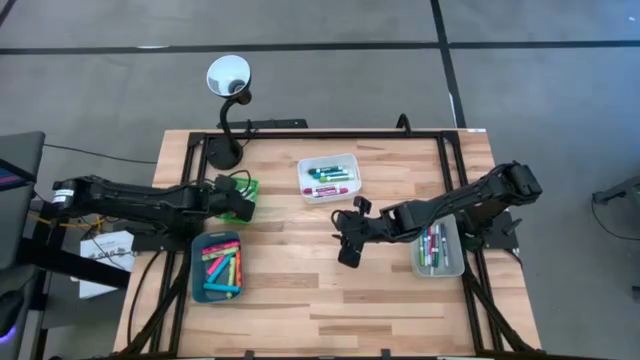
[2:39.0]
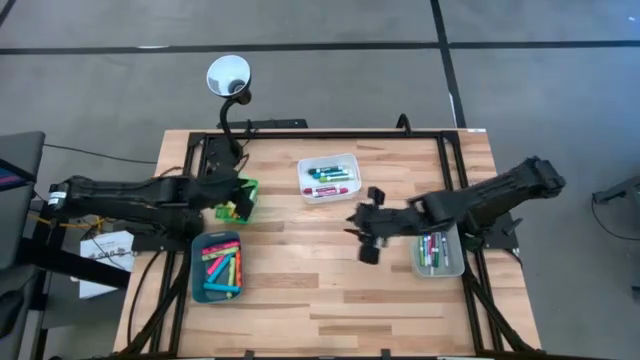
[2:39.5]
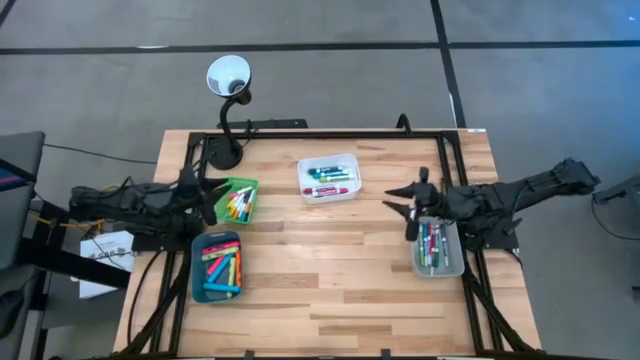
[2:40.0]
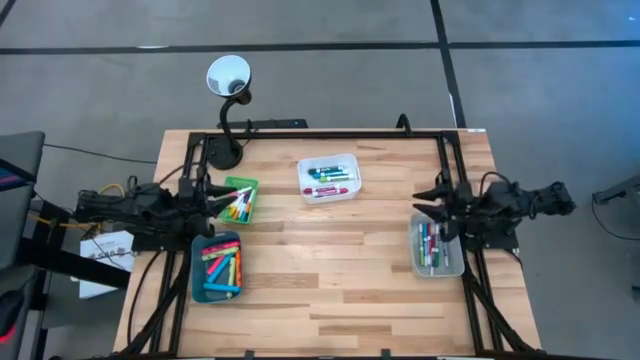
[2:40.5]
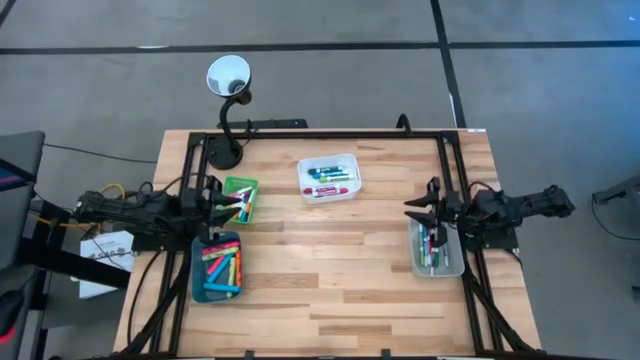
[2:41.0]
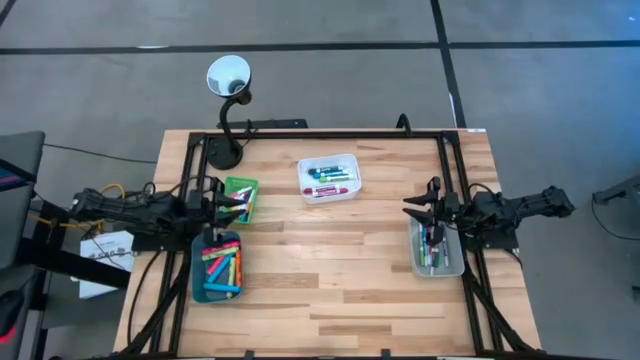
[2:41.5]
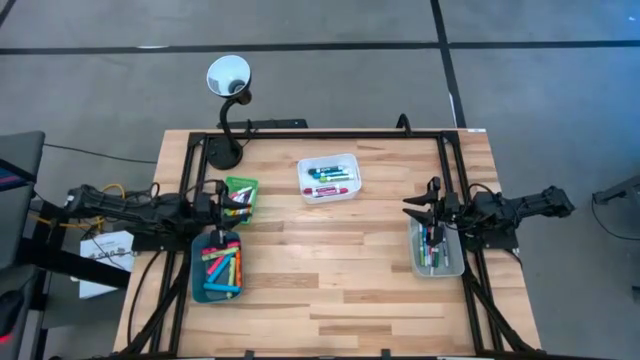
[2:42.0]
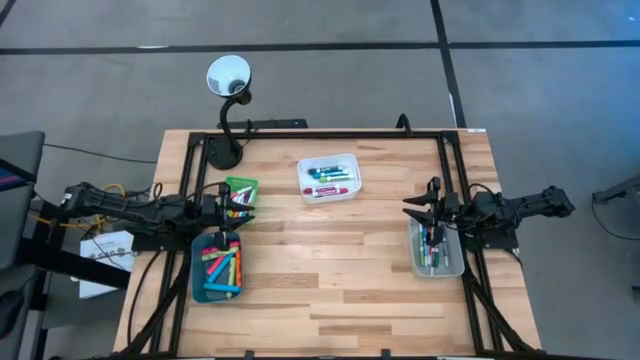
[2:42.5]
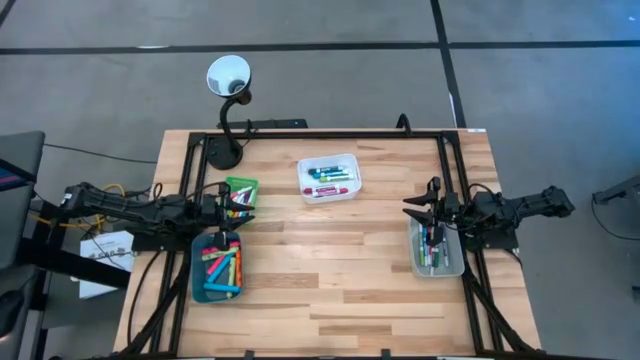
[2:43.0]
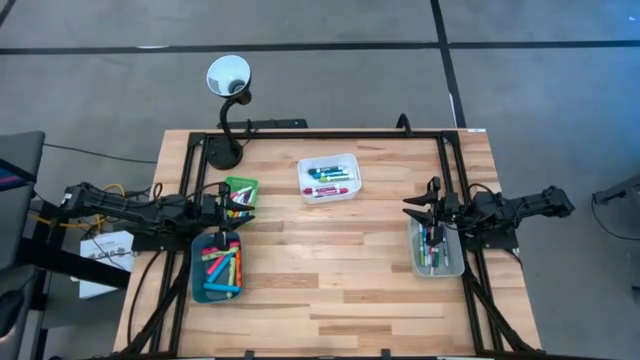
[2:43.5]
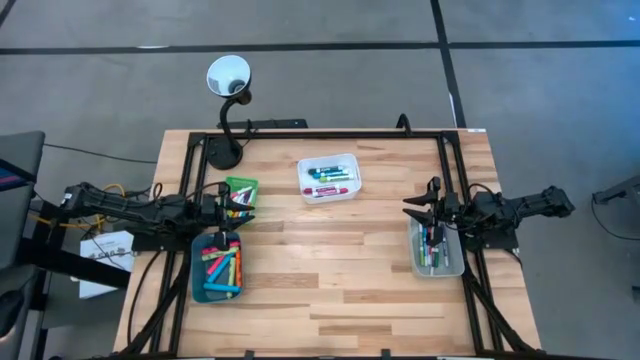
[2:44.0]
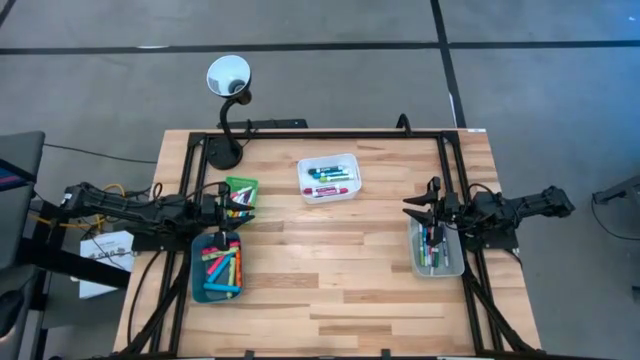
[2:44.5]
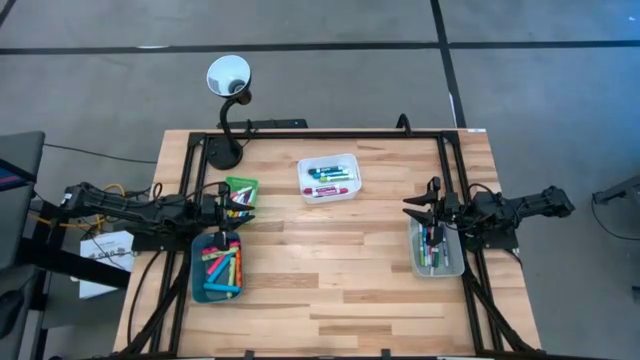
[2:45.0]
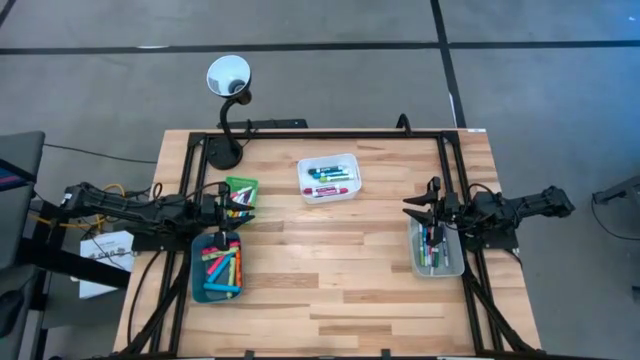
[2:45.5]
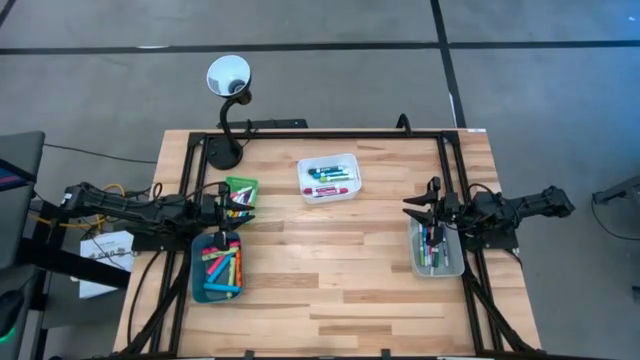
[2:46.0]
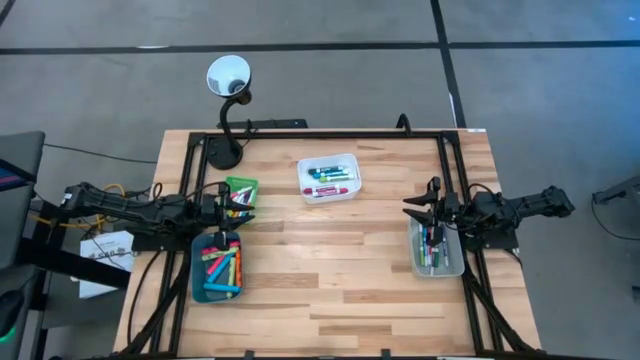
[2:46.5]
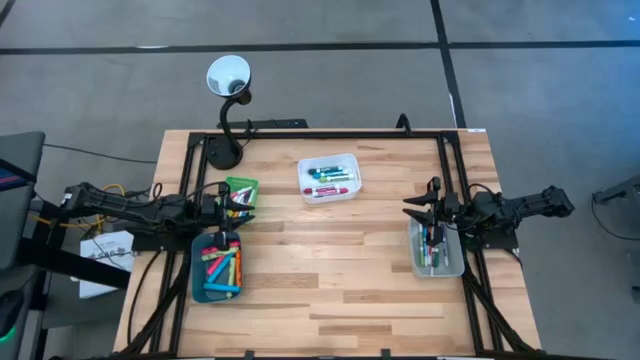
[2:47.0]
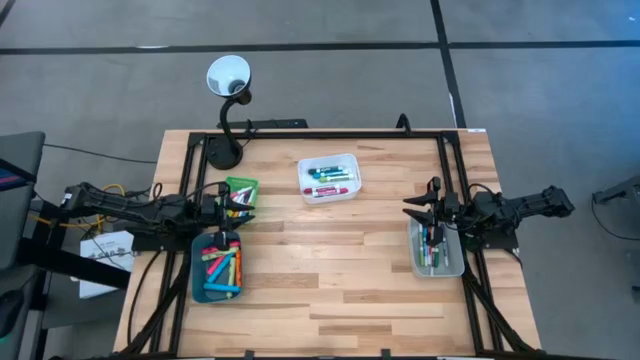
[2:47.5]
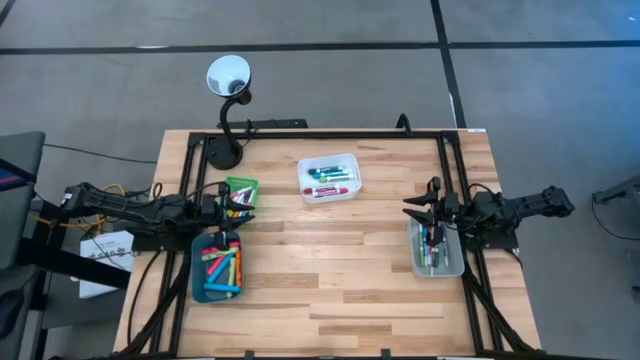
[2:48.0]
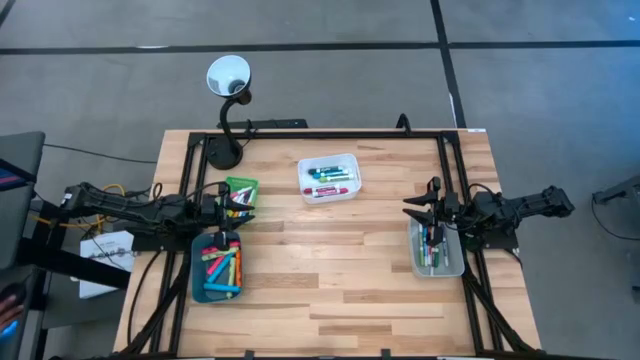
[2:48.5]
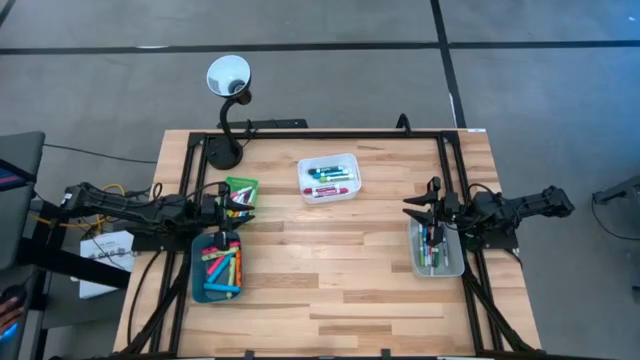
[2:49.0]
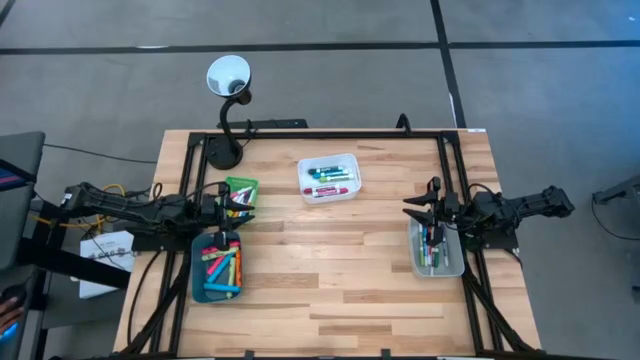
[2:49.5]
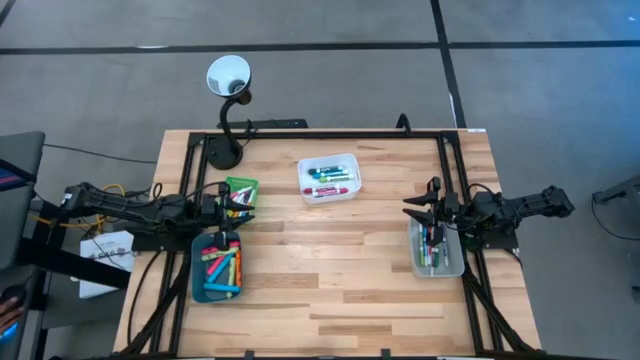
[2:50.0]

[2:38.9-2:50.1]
Task: Pick & Place Markers
Return to Home Position
